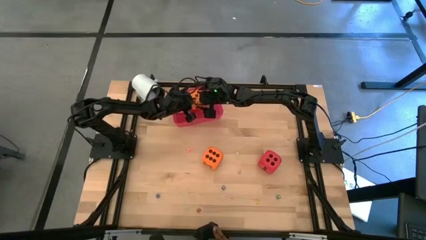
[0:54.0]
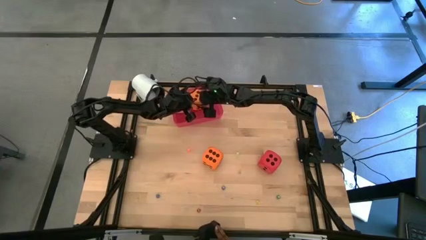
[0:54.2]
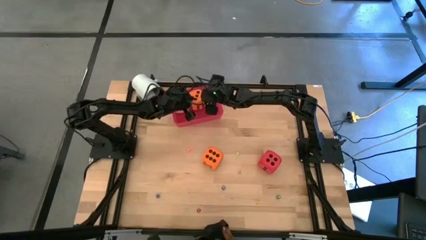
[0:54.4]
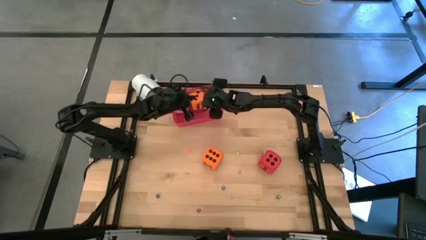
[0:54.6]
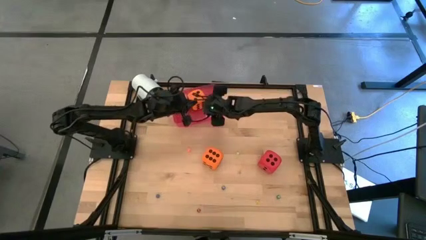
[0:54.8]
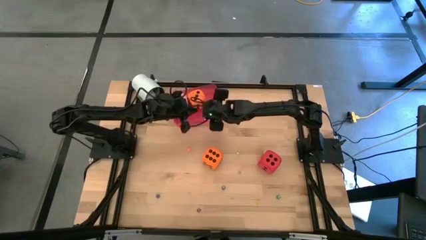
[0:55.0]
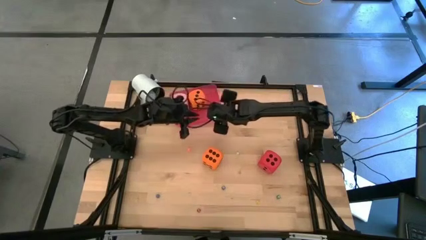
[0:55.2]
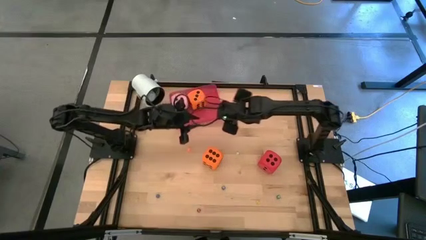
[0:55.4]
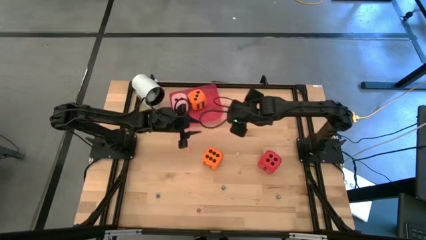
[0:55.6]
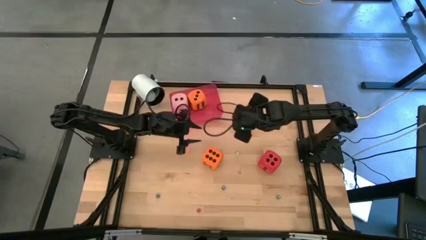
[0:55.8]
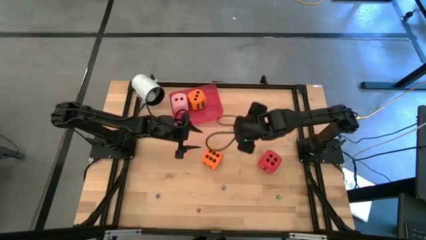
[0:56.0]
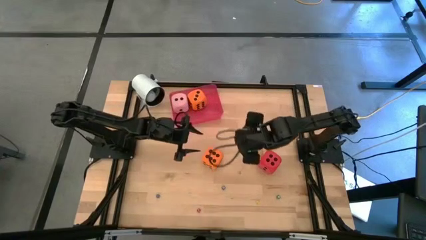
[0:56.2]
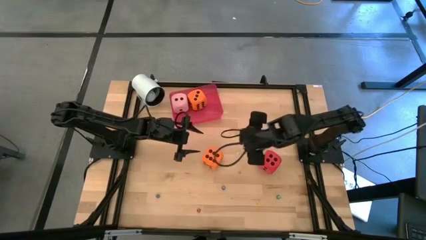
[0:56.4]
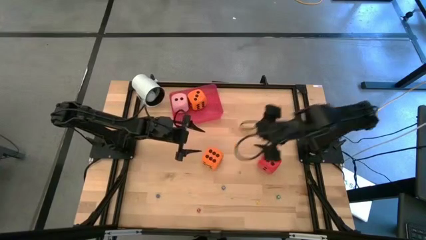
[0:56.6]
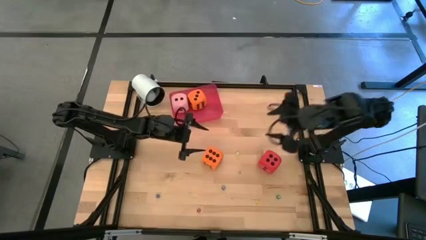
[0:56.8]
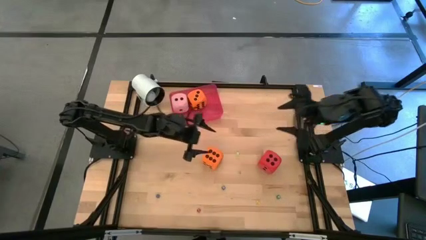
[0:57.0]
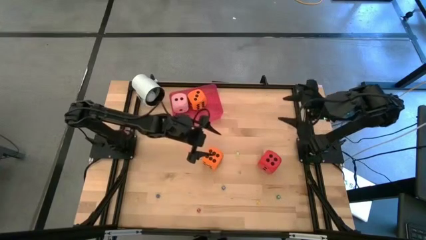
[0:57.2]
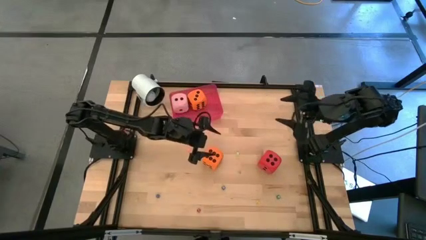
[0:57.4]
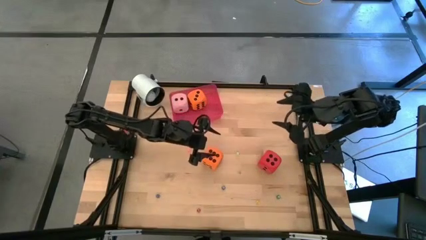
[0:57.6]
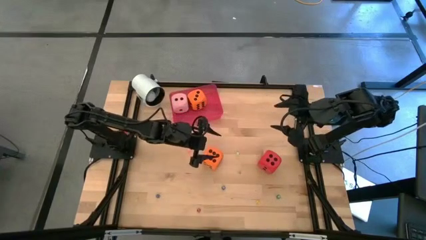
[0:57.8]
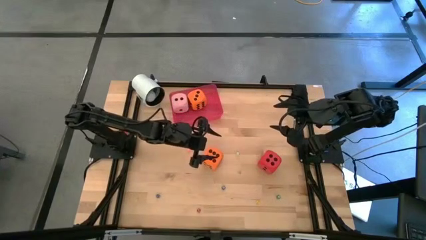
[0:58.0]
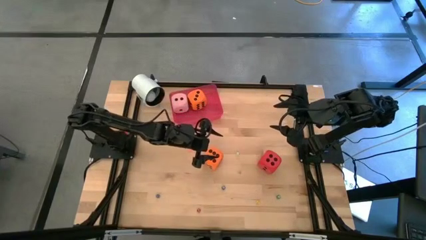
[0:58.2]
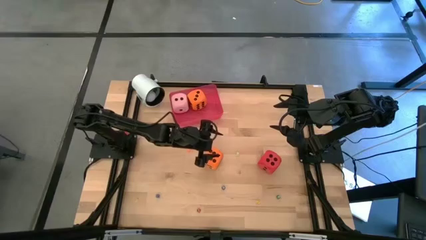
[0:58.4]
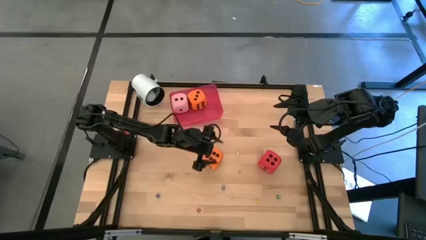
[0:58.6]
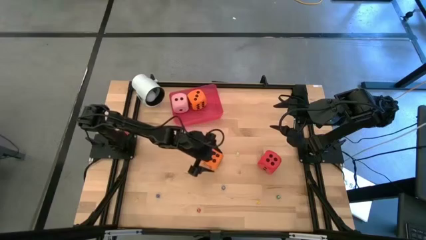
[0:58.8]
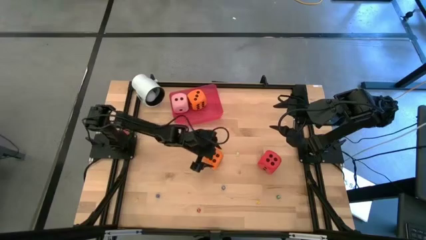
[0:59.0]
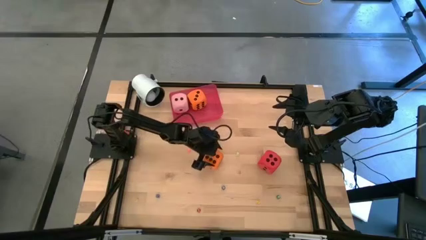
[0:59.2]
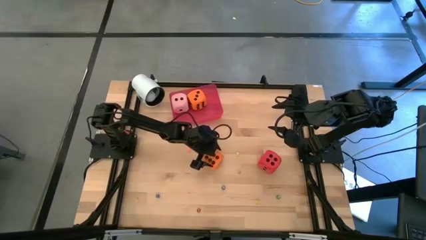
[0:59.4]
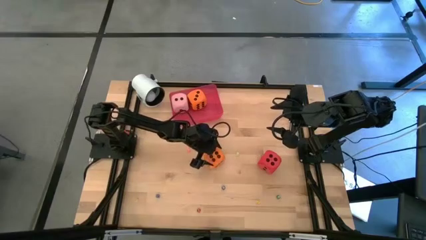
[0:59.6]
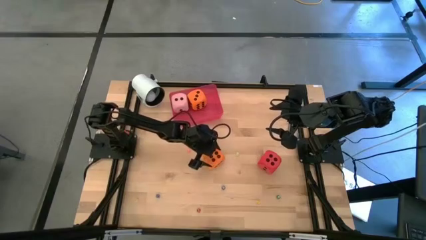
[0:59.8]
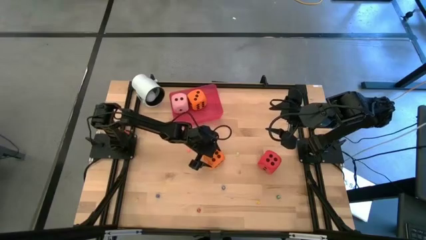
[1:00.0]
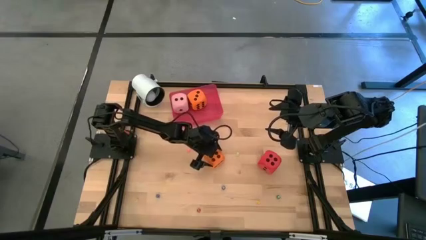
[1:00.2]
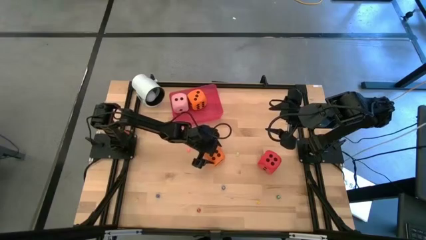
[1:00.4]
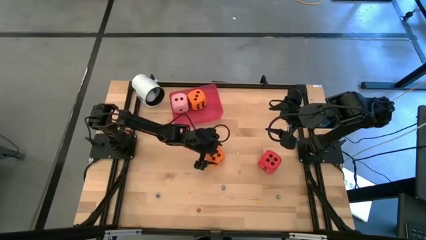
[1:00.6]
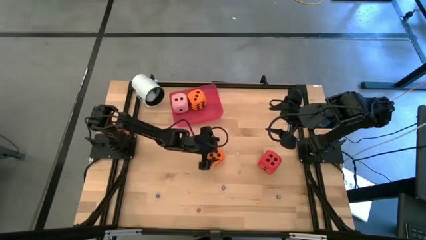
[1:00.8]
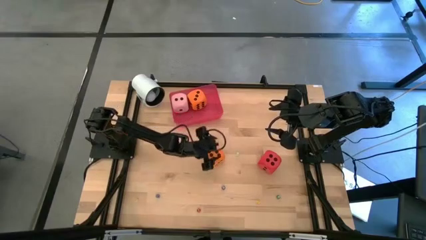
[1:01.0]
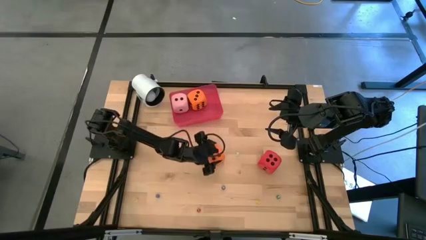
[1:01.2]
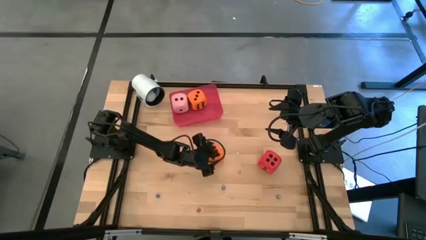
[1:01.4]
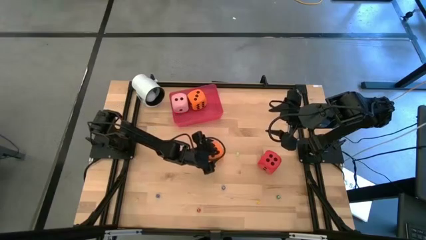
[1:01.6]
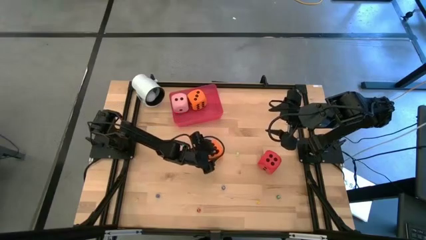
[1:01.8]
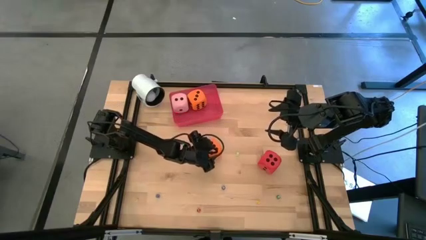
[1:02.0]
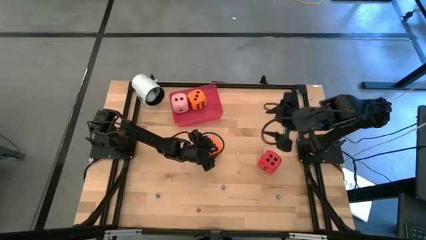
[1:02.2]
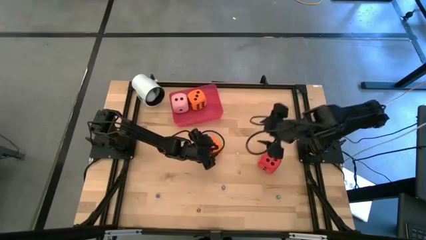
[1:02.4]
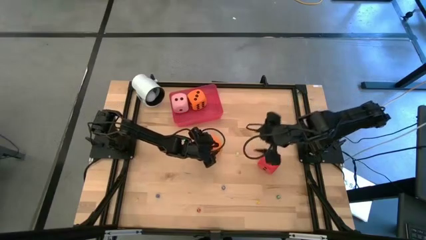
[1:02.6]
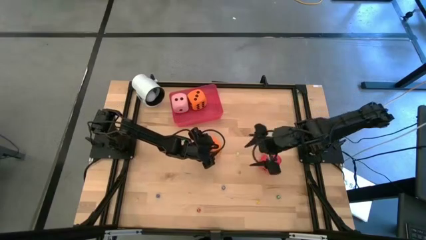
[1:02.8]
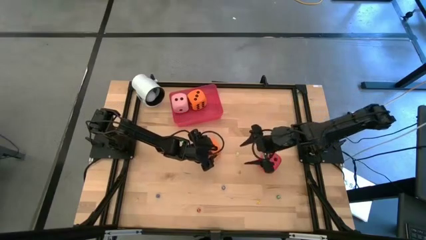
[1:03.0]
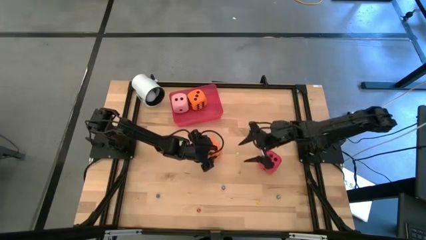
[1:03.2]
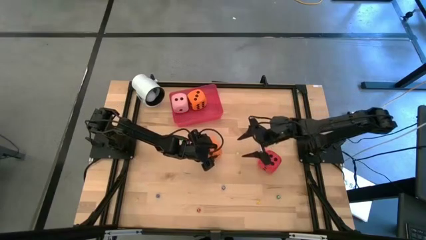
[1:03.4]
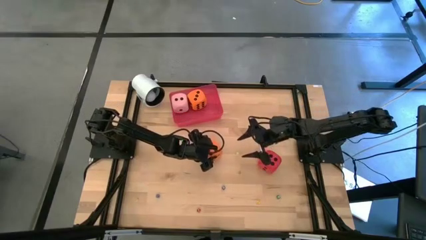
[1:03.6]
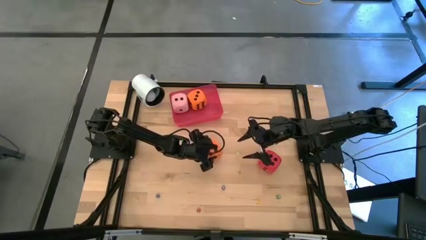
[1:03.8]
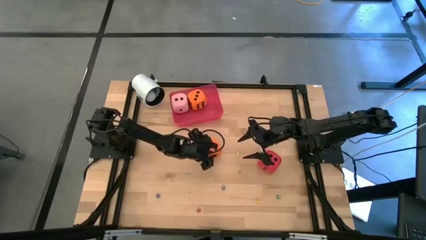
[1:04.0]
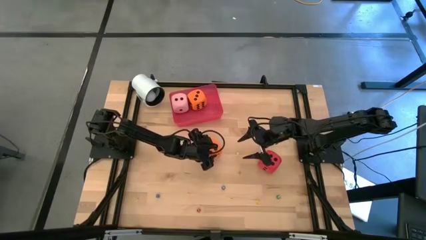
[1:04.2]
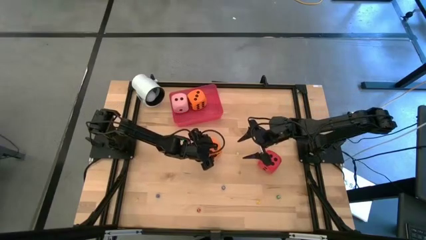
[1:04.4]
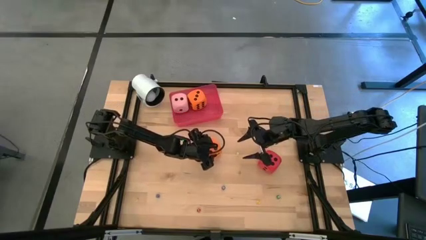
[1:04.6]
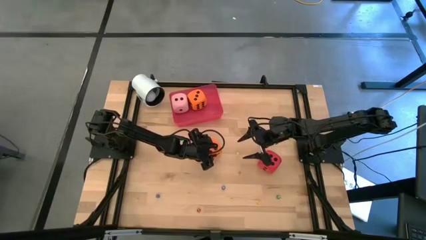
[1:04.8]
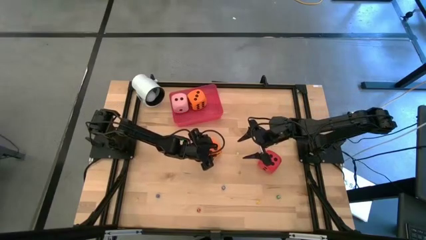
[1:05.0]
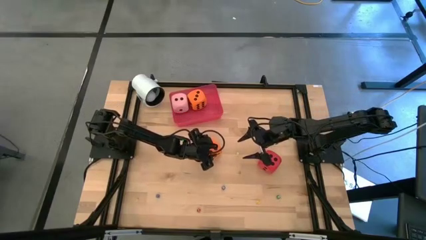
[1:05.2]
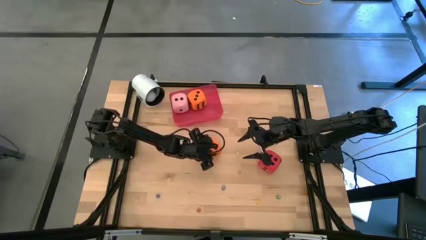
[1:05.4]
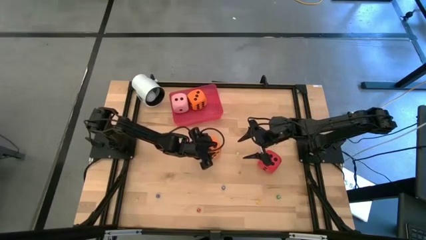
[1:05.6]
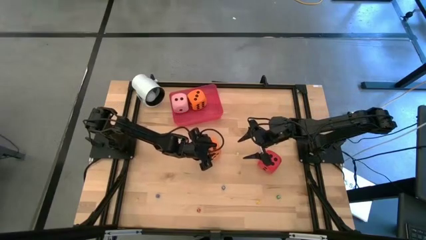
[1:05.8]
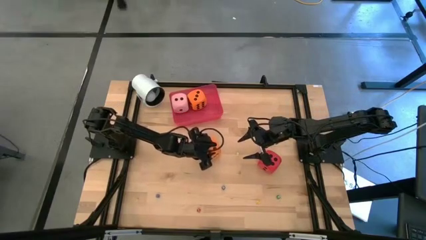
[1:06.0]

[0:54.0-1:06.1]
Task: Pick & Place Dice
Put the large orange die into the red bin
